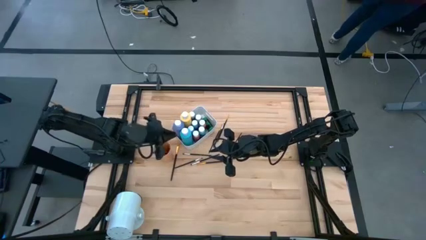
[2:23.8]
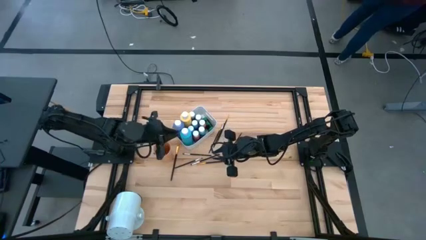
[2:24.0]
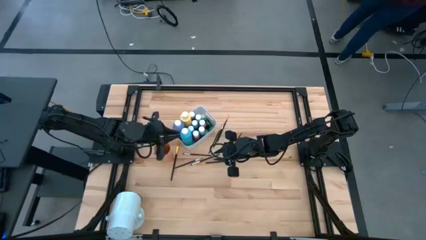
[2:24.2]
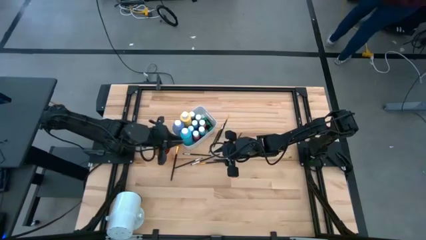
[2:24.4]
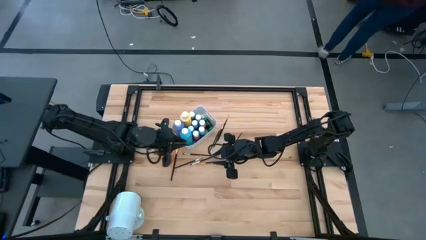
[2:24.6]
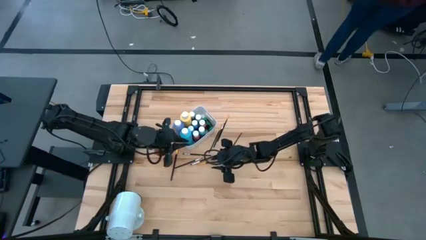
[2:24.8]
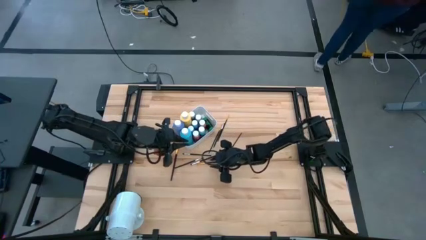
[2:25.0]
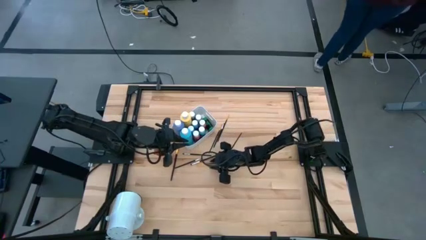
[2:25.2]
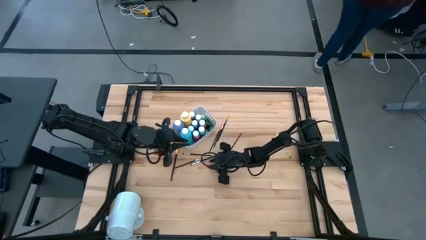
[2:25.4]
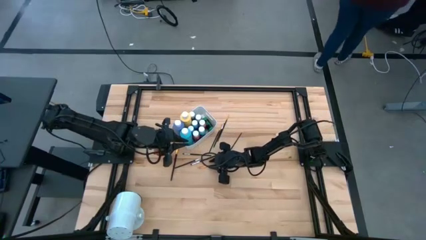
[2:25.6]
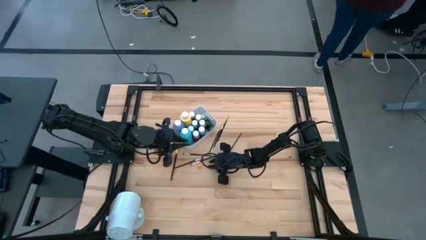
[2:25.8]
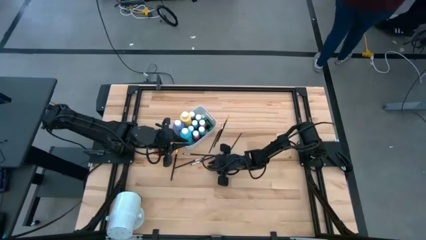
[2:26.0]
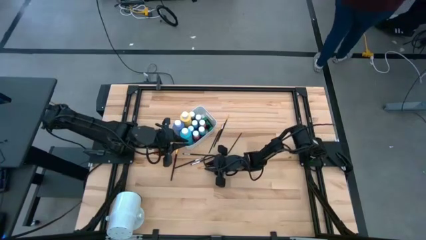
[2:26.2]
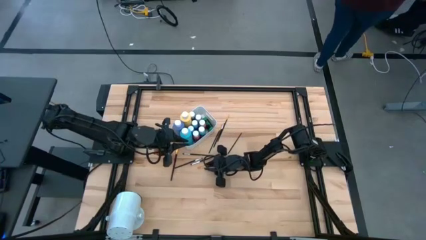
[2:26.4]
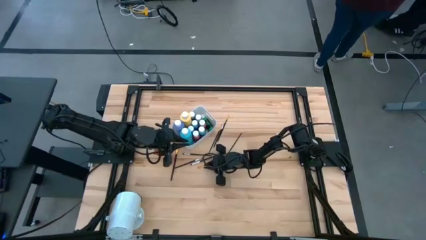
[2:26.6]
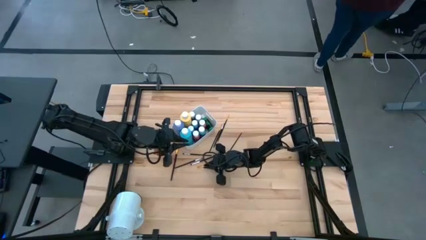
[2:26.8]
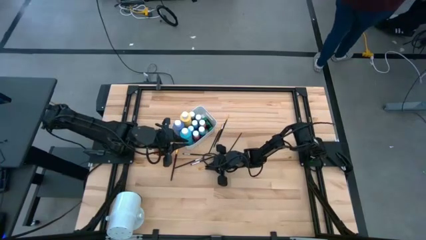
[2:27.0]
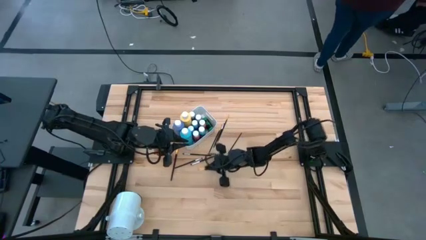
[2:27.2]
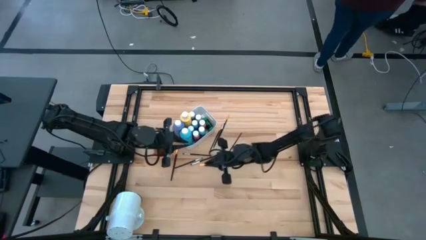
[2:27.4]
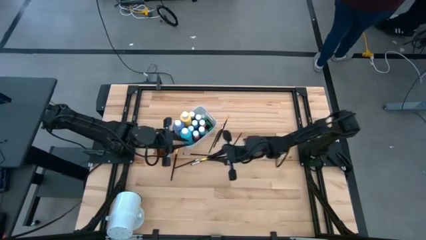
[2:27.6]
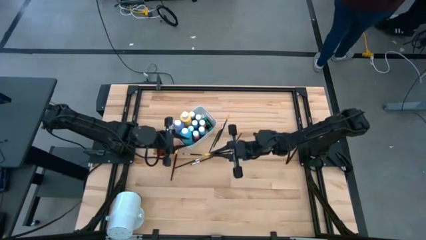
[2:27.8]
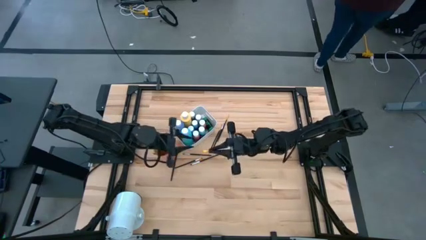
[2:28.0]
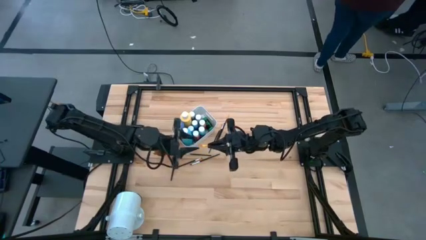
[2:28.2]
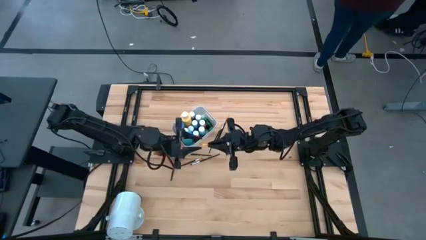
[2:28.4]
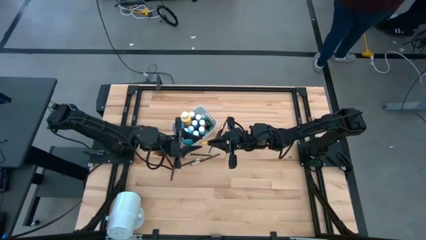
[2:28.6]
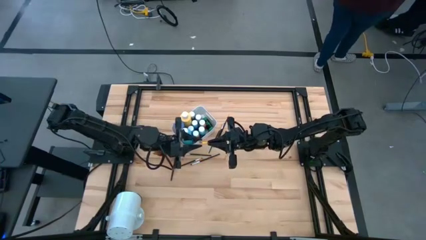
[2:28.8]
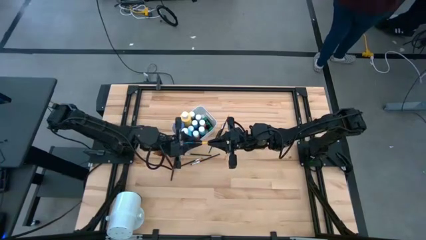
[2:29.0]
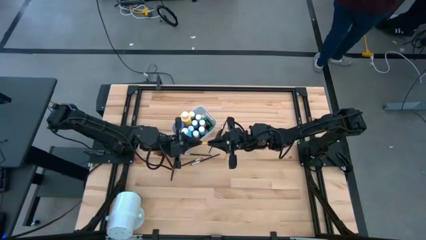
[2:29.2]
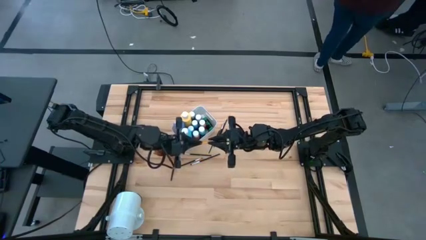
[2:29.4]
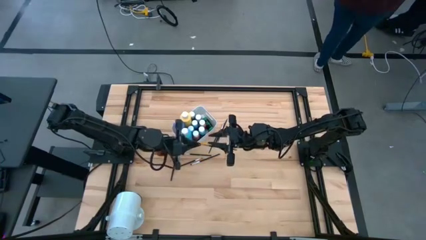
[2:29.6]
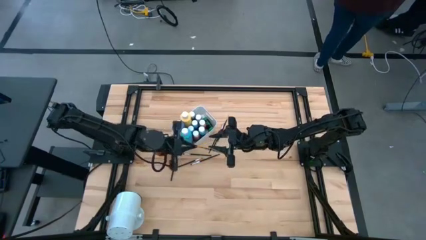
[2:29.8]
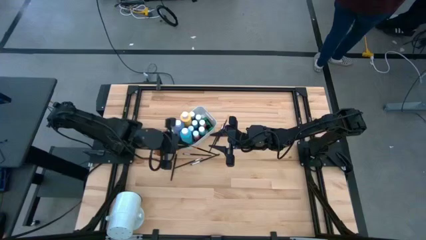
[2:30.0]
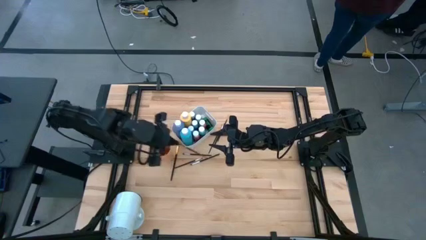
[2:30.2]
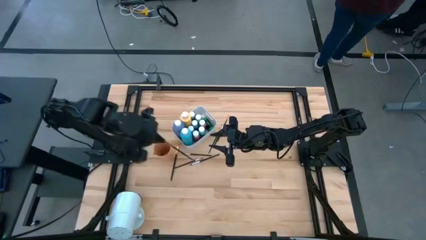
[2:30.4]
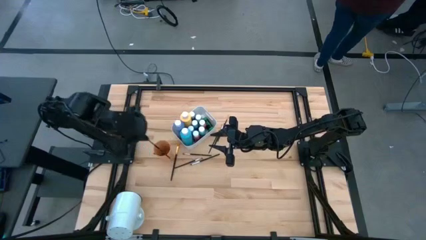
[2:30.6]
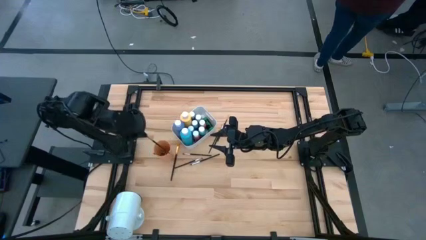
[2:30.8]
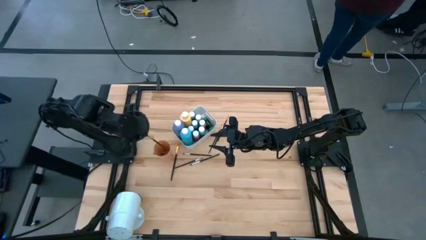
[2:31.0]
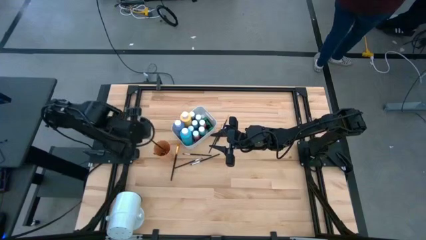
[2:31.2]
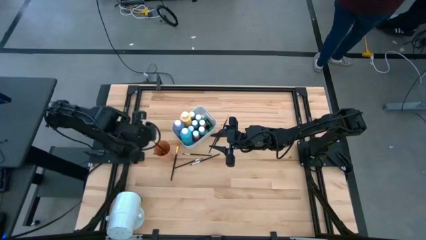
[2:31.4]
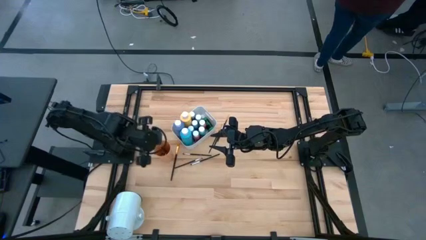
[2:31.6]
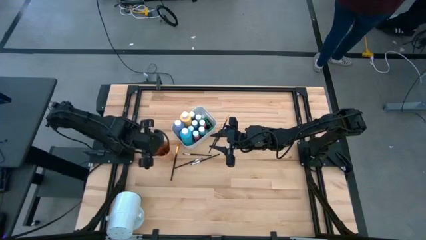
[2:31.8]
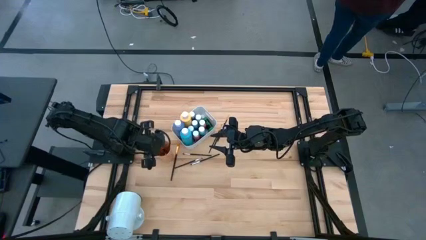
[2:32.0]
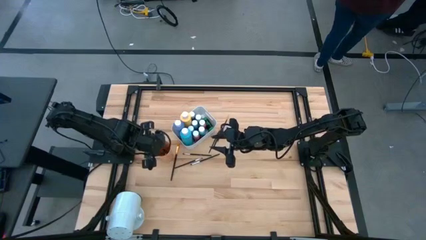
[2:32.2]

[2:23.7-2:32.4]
Task: Pick & Place Paint Supplies
Put the black gold paintbrush into the orange cup

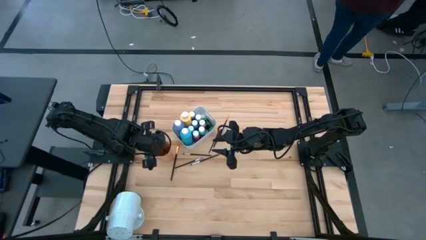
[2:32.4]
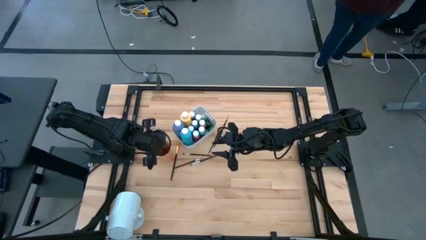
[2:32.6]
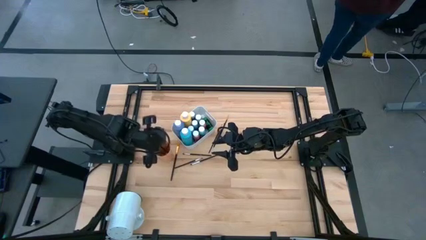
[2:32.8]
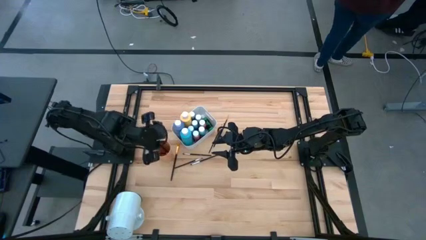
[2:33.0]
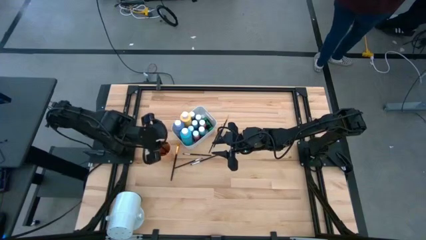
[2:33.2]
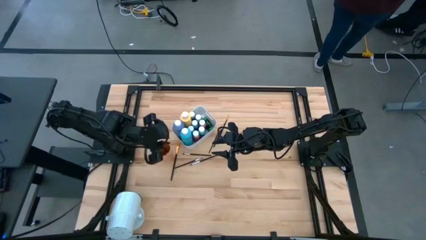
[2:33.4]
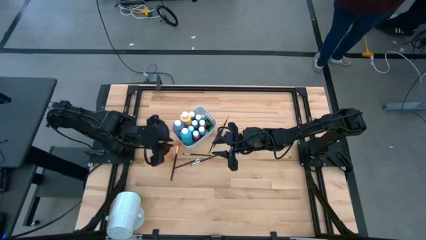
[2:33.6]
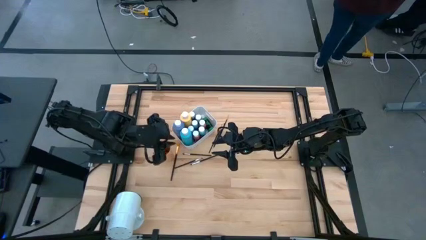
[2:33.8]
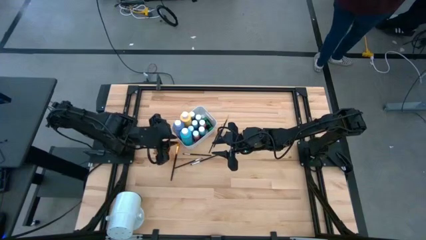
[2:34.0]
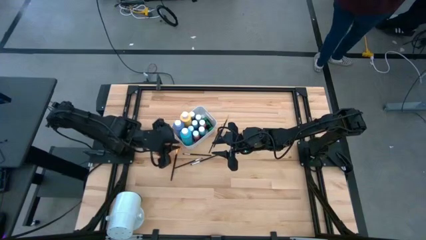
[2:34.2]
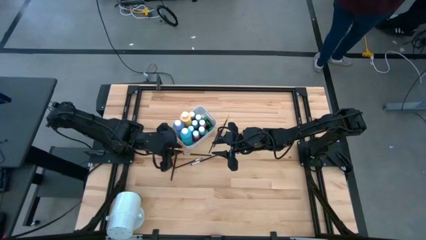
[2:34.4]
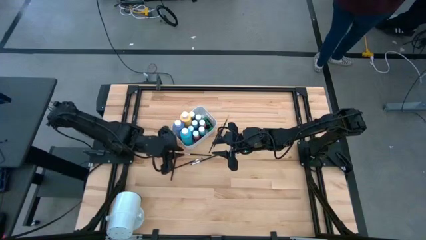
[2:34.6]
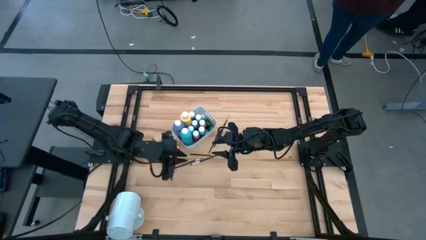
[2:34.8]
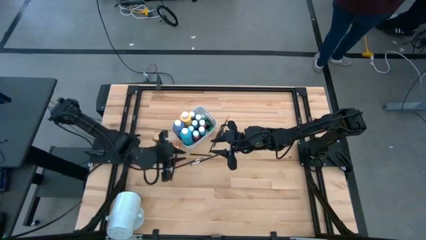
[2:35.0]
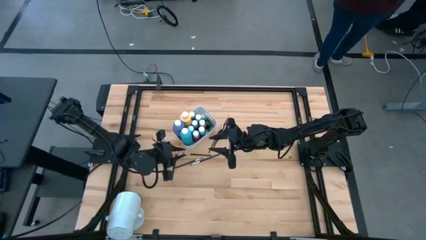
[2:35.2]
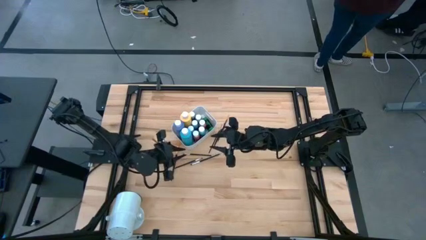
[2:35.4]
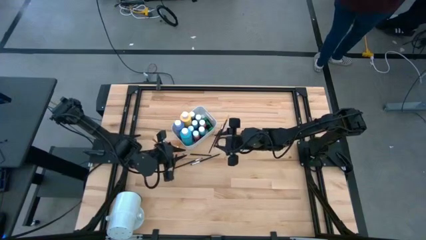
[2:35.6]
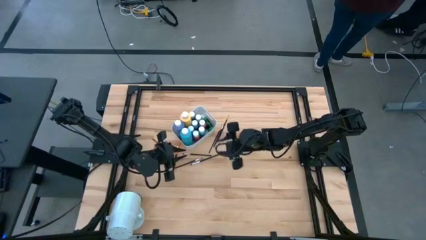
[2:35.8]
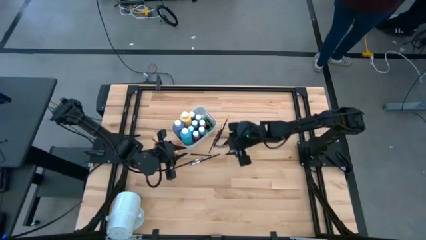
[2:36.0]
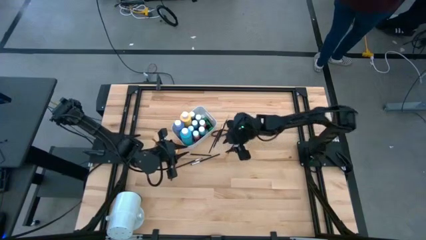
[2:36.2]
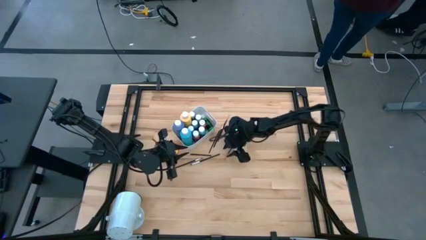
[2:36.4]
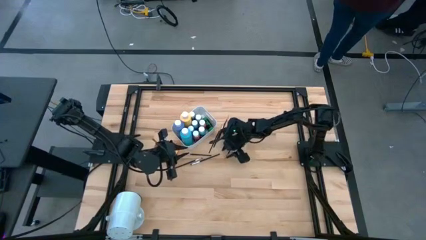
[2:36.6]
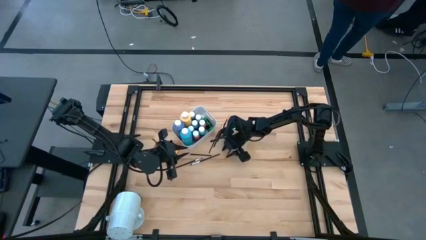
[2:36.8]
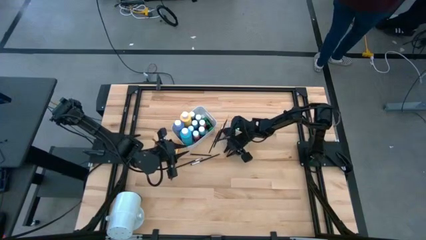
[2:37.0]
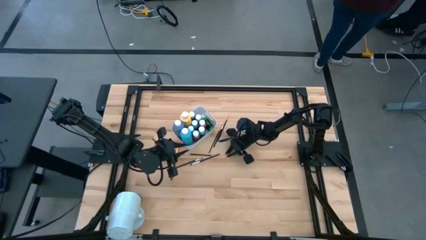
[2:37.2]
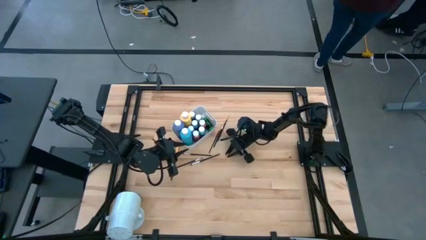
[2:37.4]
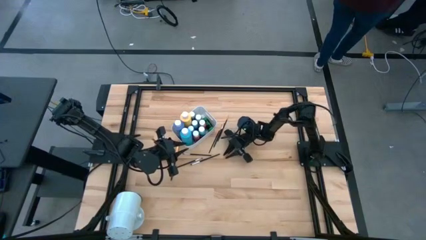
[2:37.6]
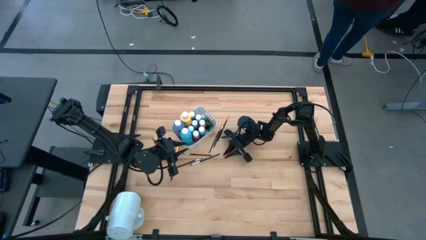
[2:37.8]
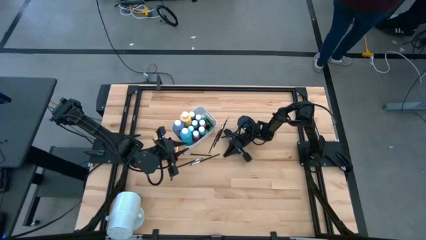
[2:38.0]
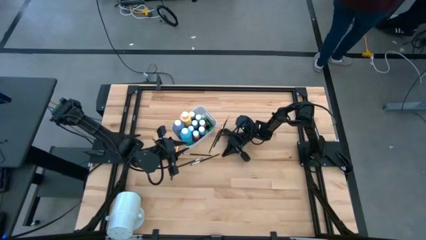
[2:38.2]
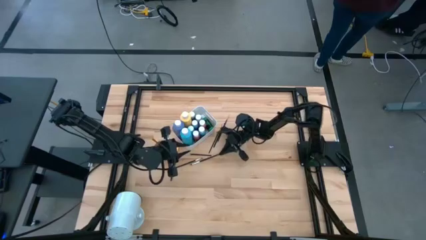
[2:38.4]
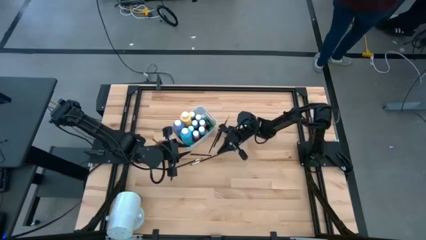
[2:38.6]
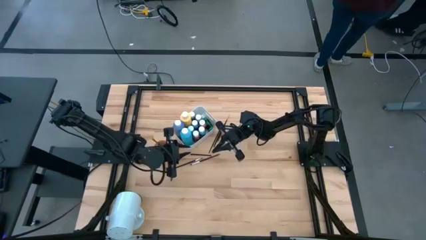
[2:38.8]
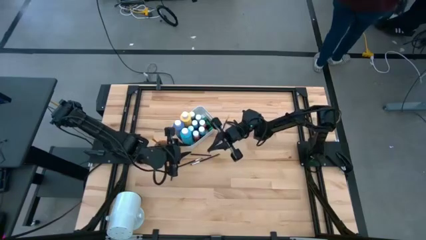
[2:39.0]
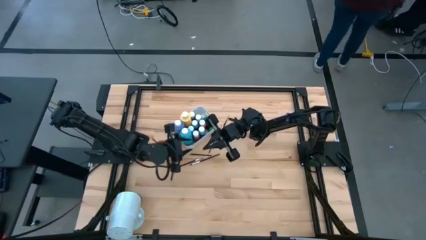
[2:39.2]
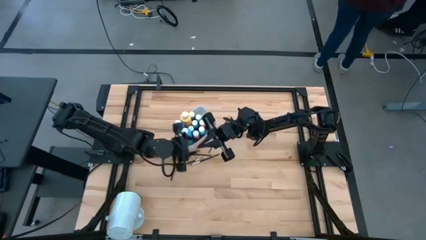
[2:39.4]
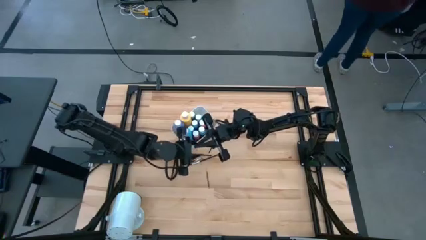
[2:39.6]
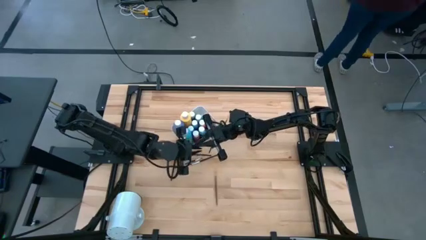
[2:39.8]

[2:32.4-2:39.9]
Put the black gold paintbrush into the orange cup
